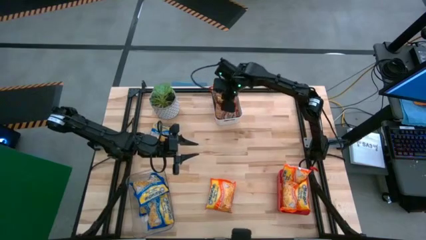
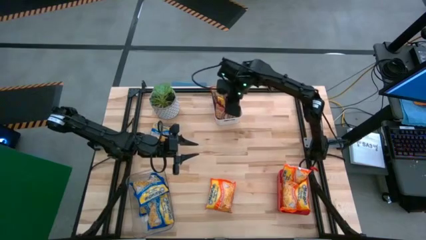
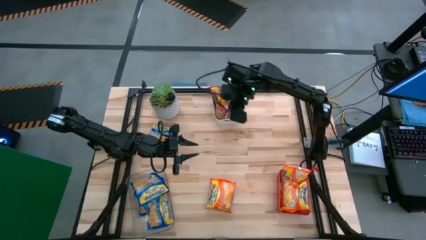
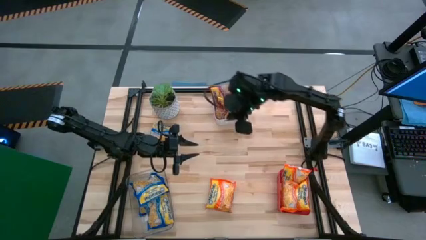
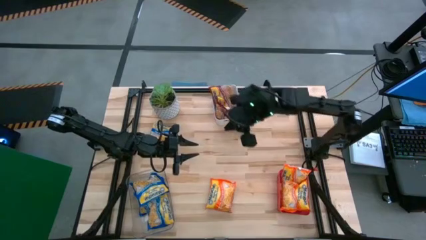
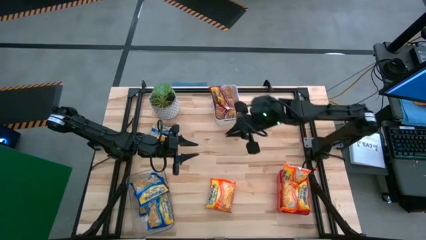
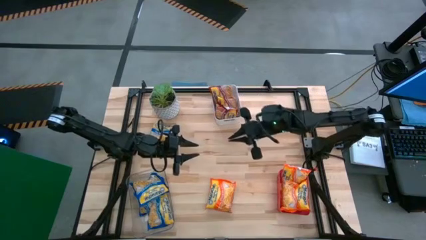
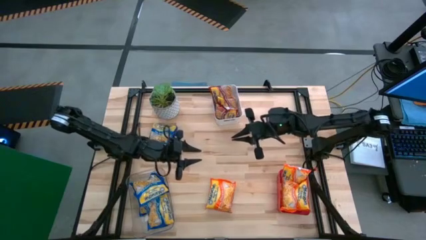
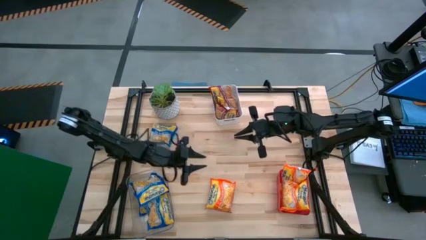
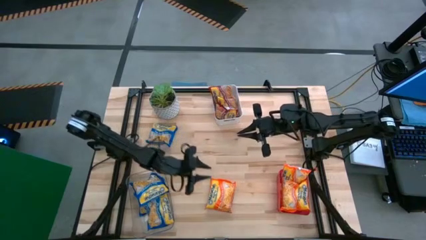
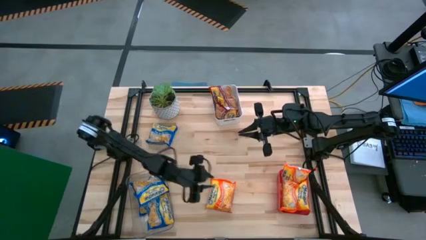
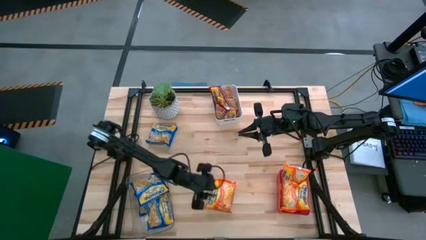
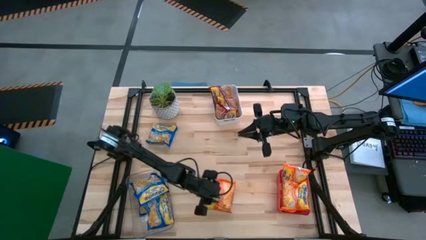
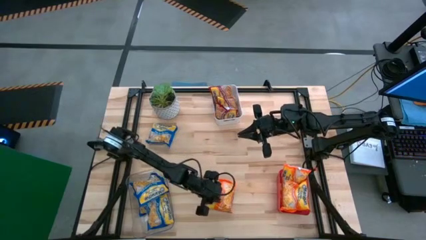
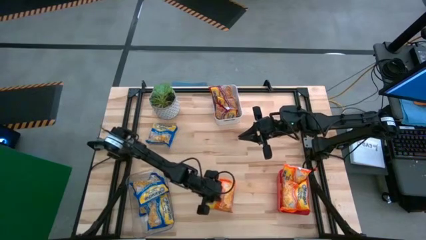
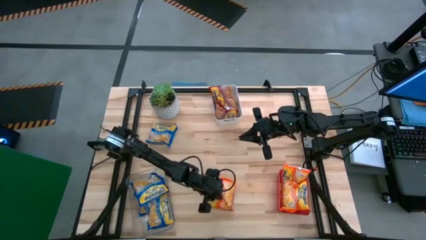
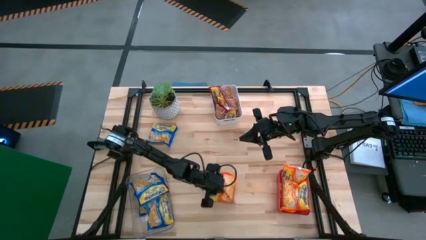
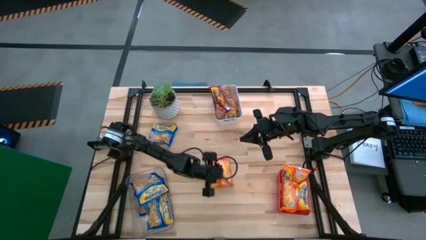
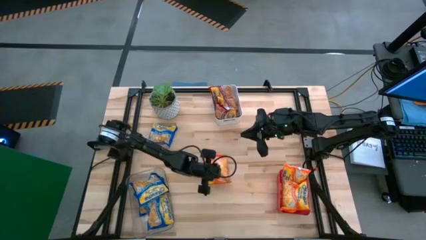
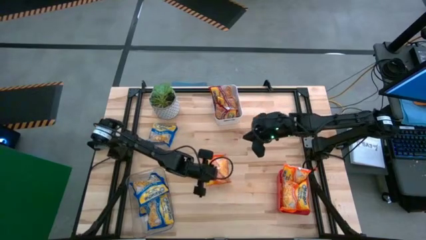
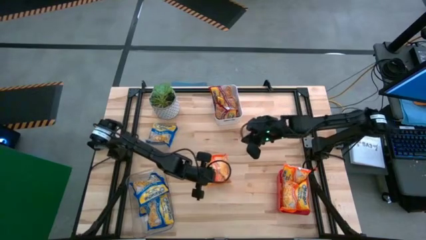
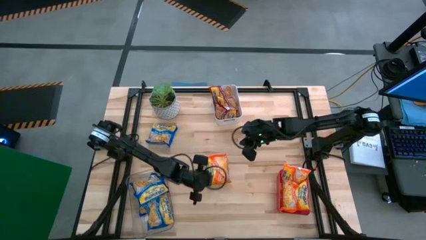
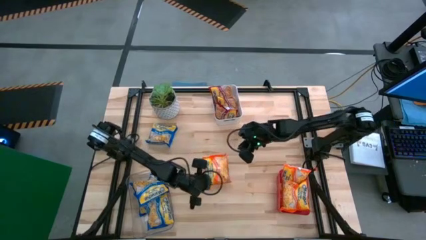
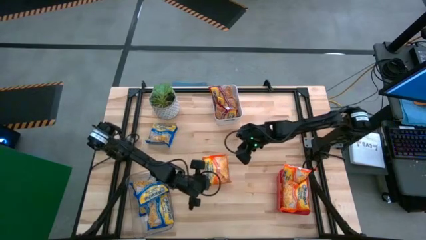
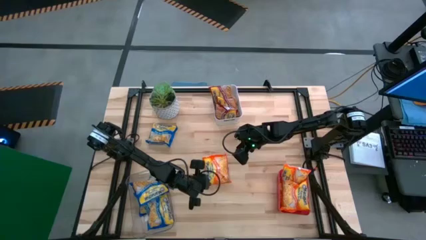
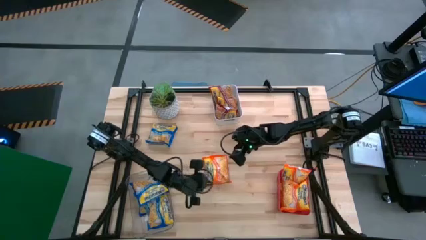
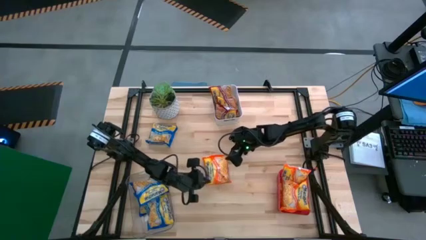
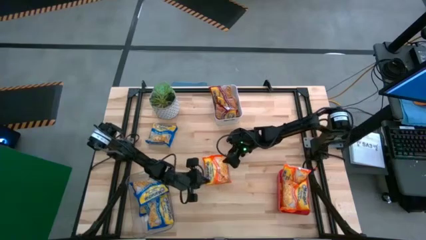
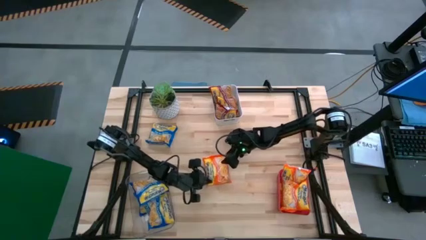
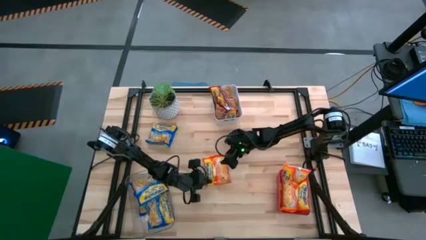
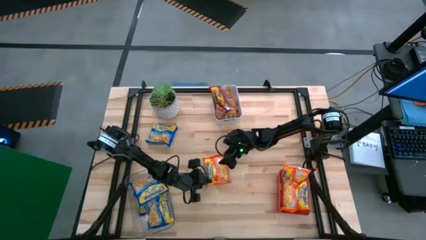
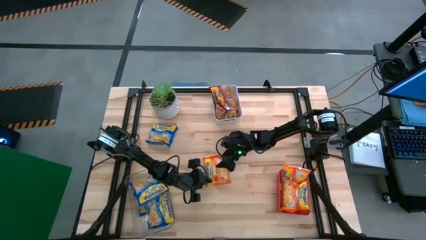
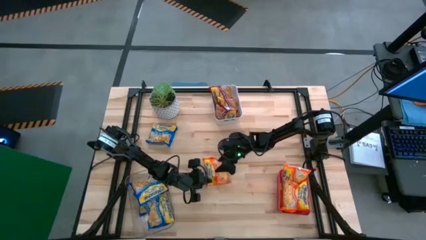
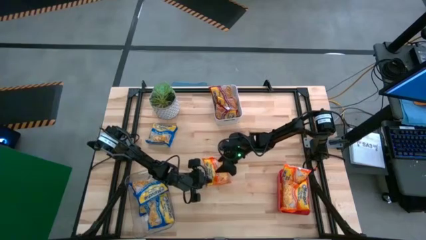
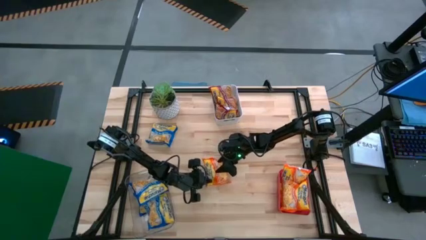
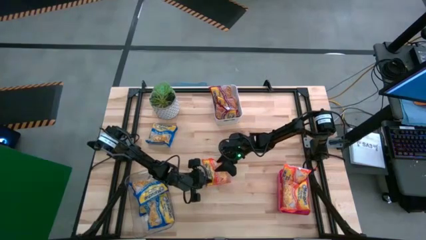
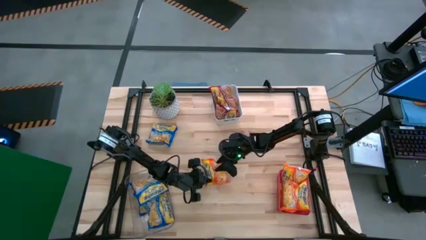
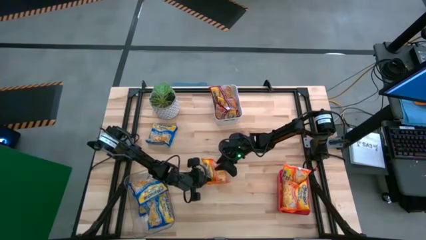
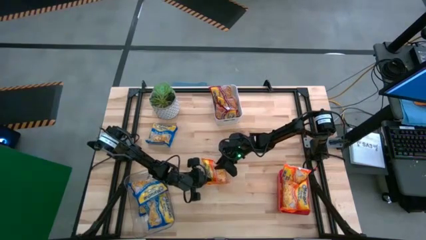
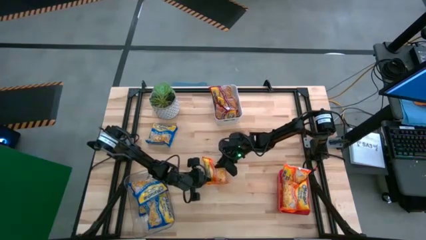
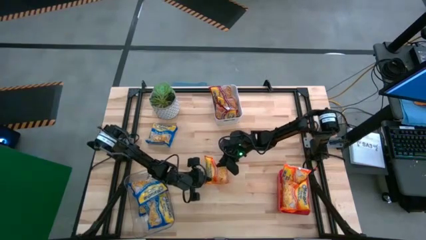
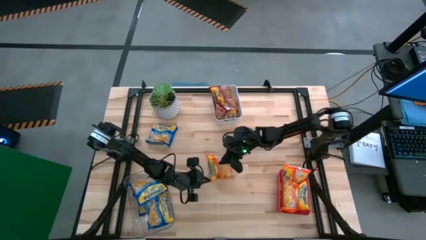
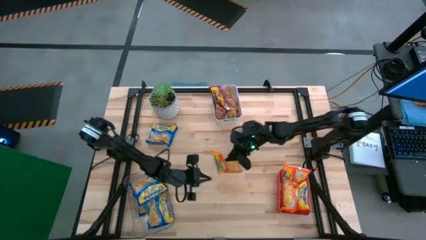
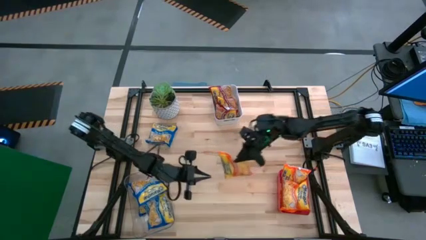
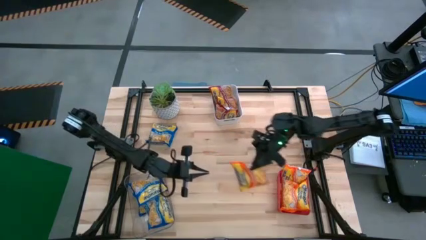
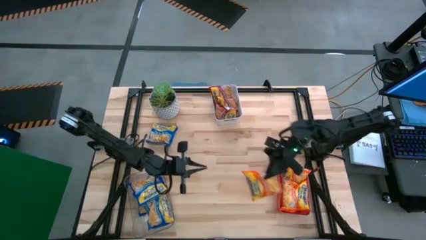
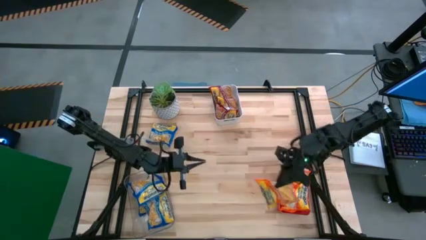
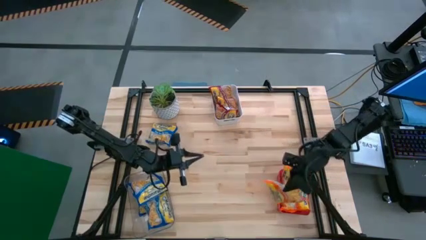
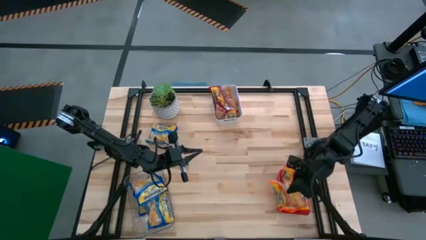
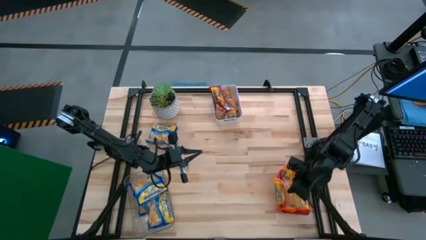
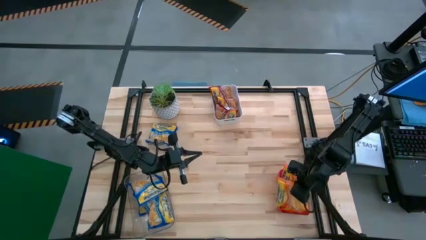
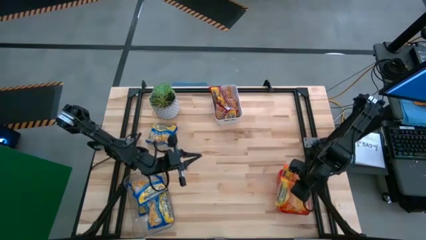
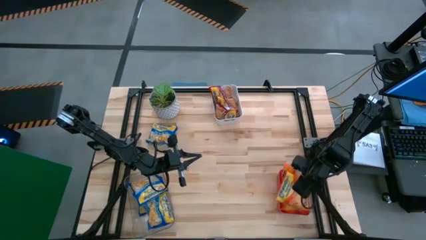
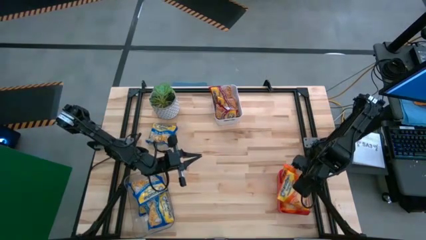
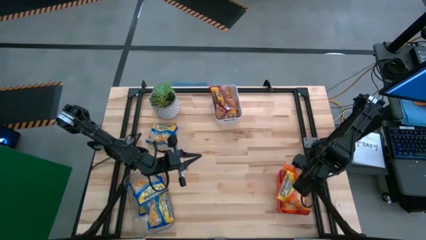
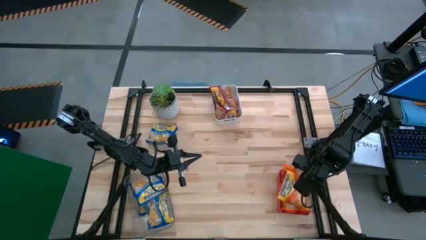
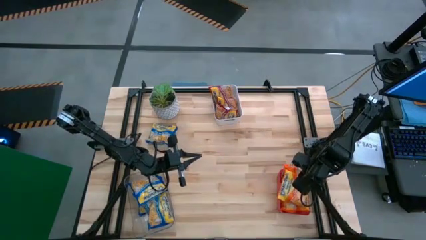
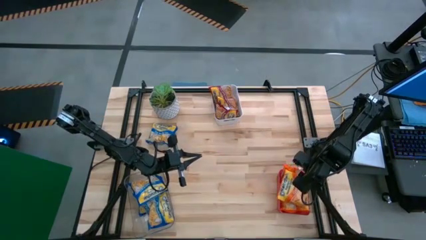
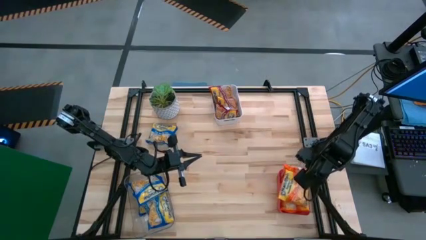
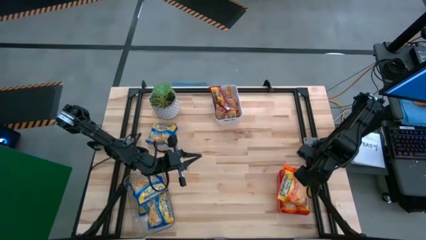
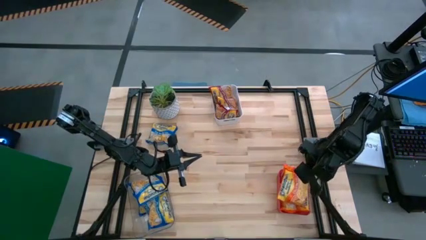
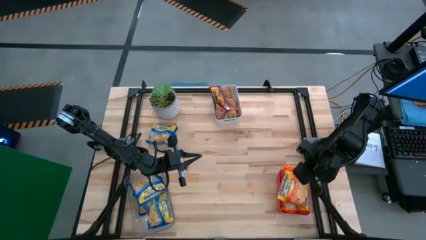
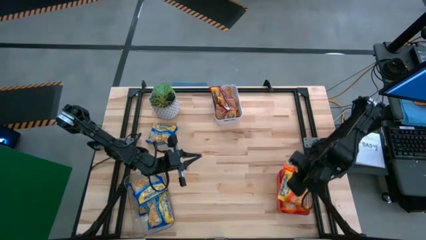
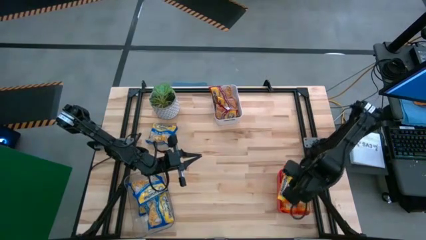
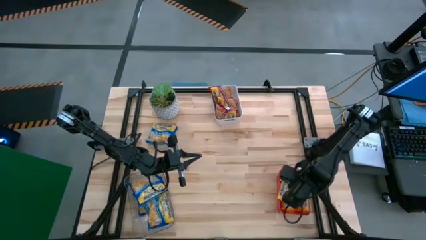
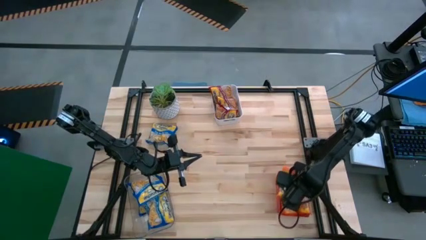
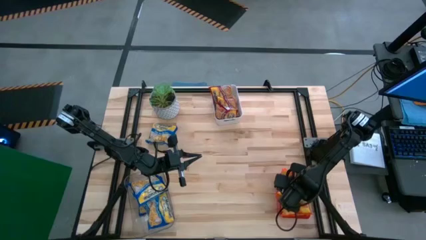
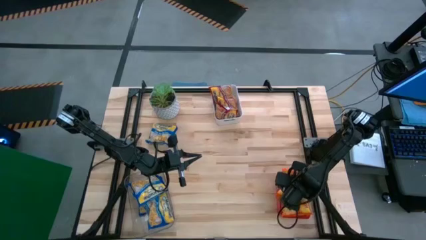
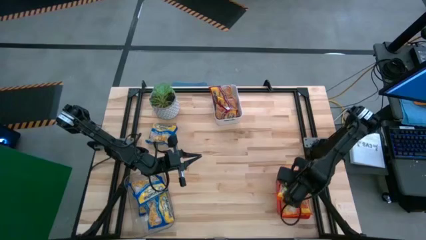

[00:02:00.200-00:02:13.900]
Task: Sort Maruchan noodles
Put the orange noodle pack into the pink bin

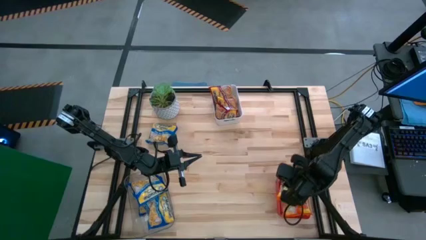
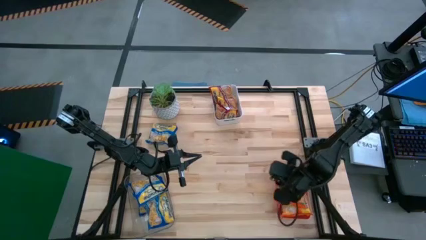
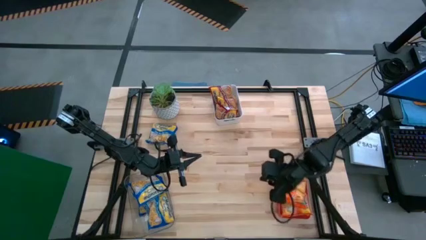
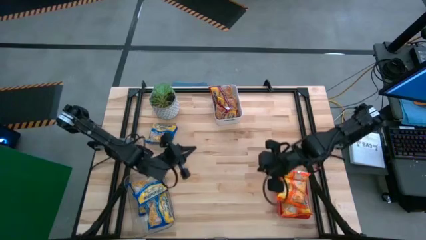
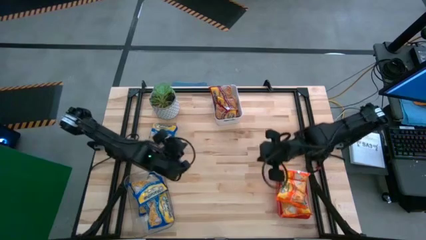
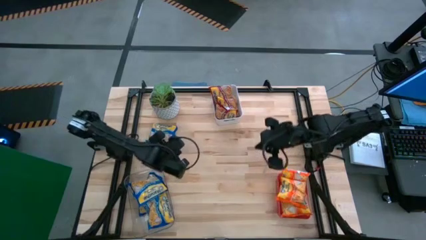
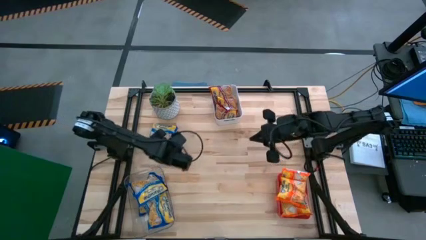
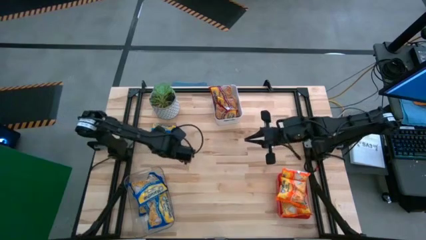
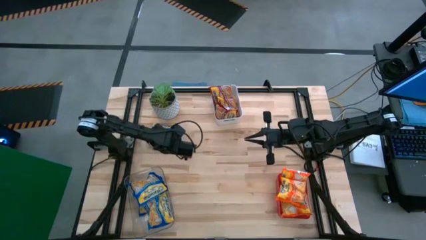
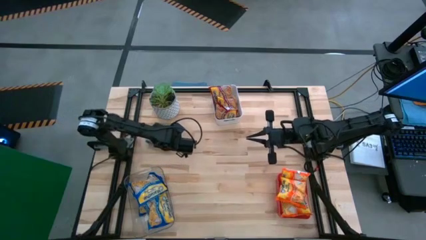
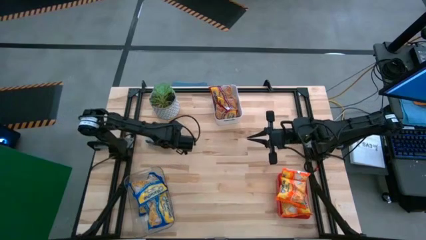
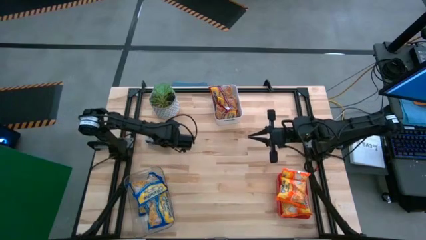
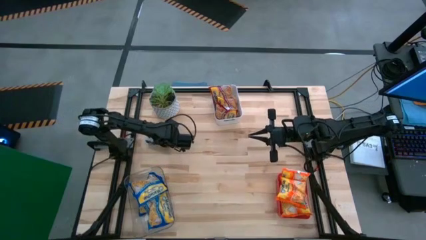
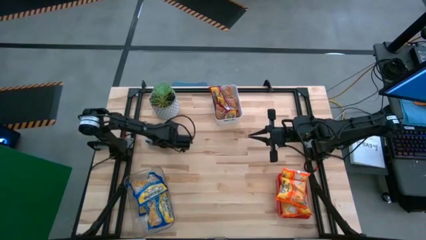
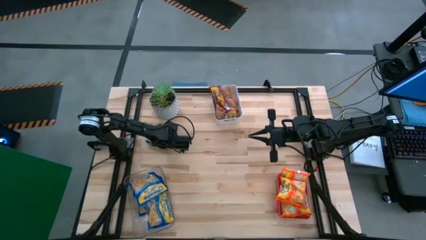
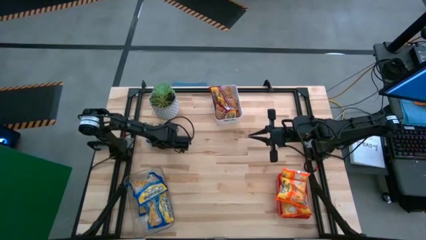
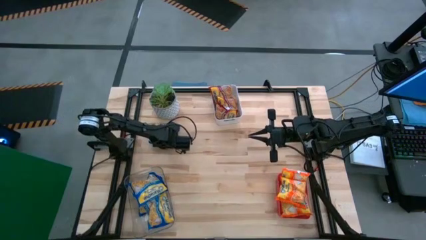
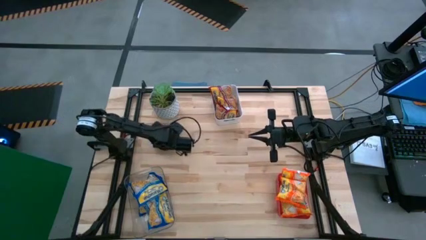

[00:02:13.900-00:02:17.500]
Put the blue noodle pack into the transparent bin

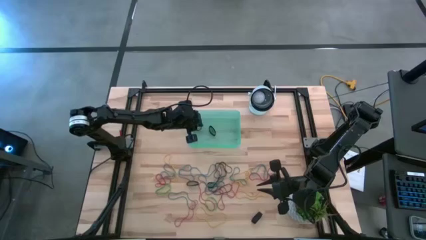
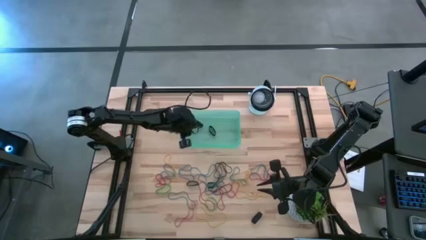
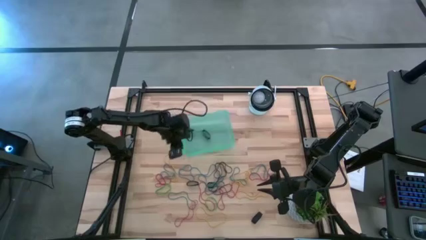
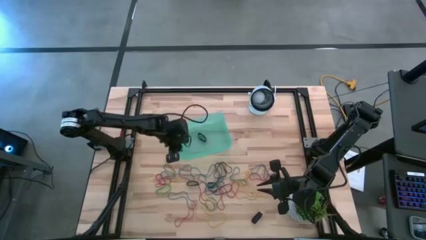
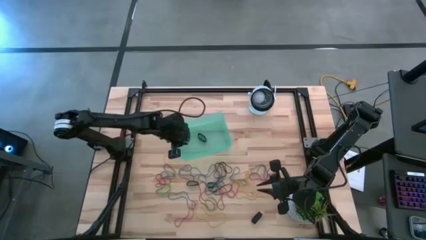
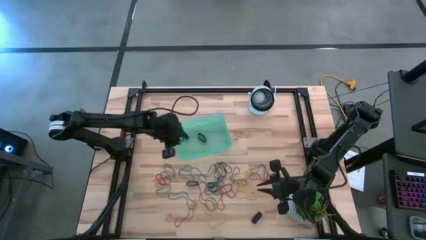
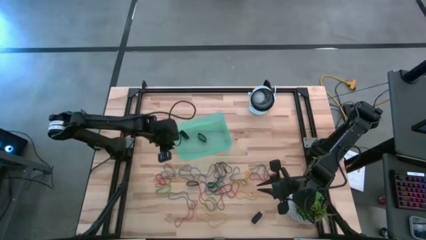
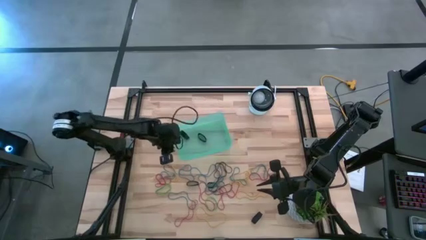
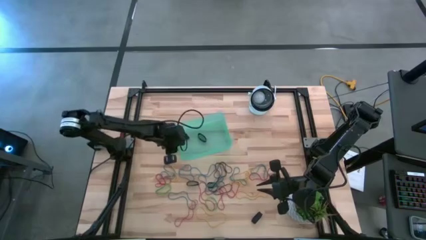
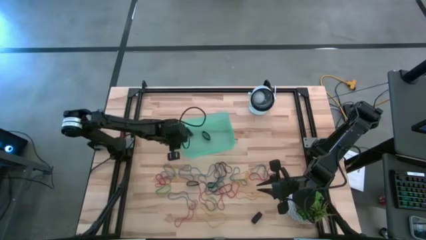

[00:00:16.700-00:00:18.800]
Task: Pick and place rubber bands into bin
Adjust the green bin
